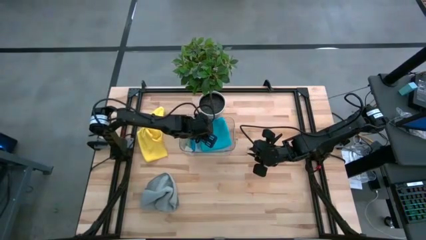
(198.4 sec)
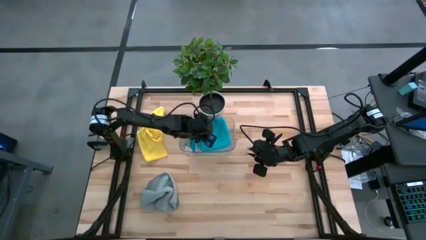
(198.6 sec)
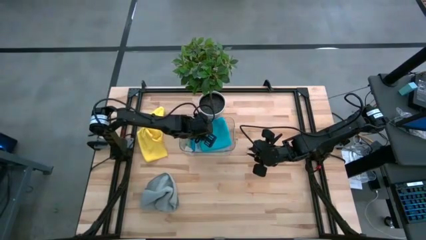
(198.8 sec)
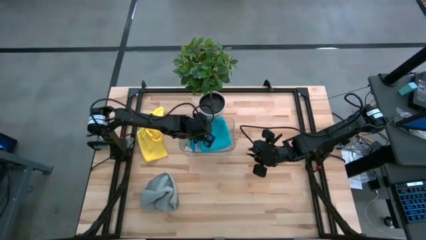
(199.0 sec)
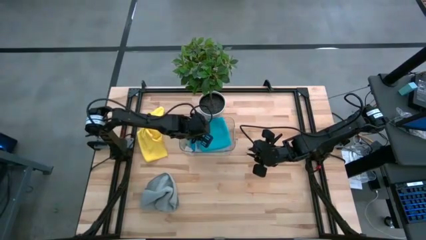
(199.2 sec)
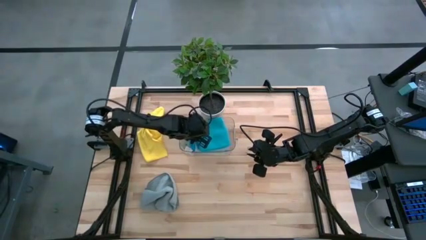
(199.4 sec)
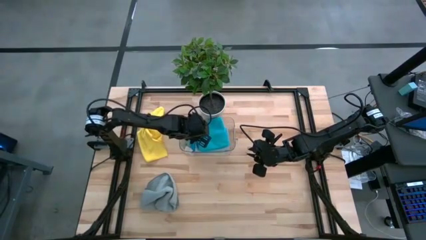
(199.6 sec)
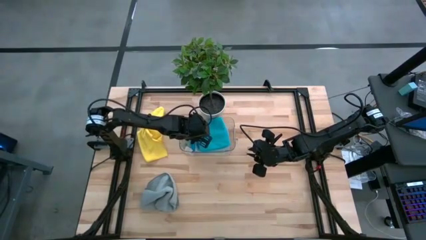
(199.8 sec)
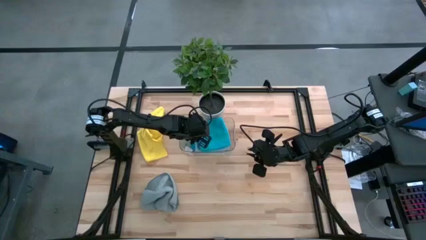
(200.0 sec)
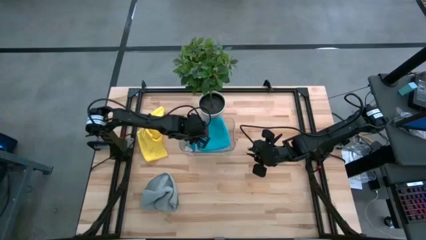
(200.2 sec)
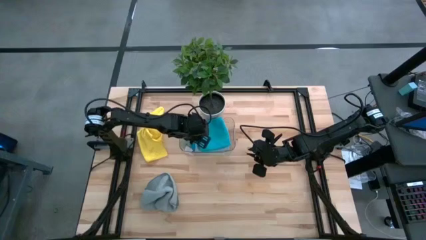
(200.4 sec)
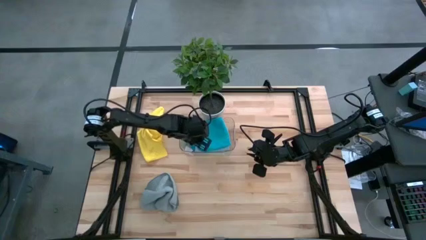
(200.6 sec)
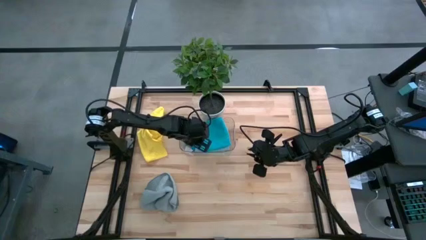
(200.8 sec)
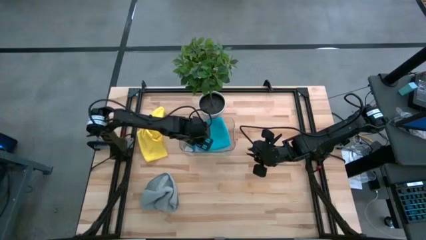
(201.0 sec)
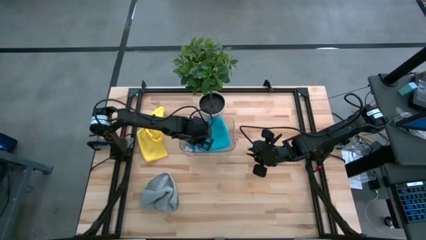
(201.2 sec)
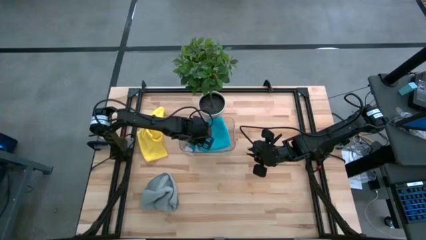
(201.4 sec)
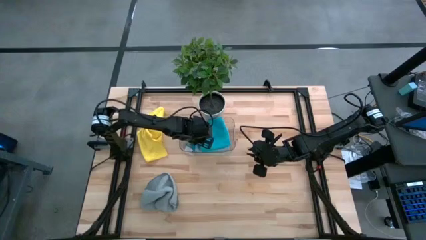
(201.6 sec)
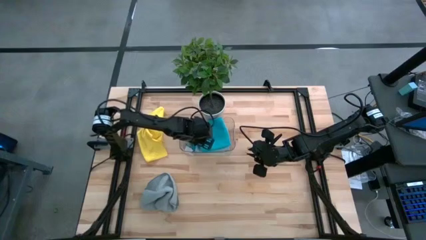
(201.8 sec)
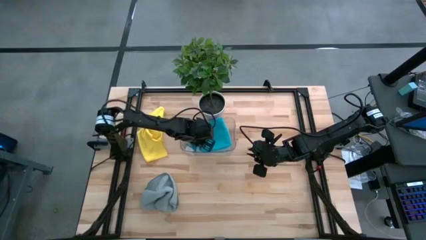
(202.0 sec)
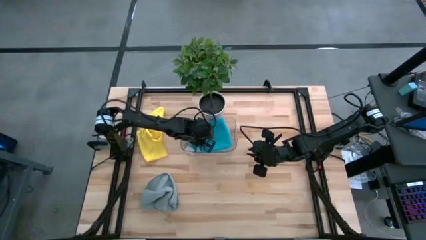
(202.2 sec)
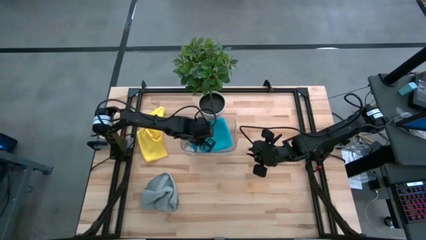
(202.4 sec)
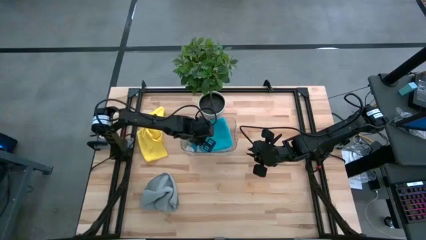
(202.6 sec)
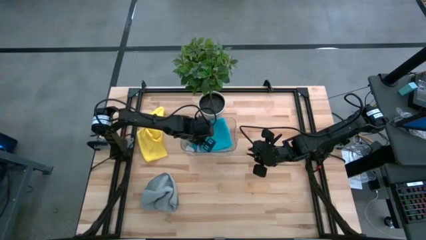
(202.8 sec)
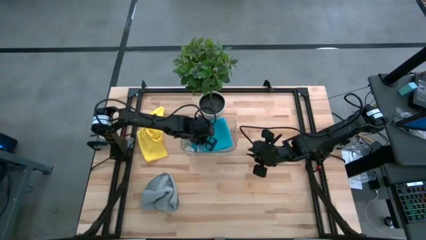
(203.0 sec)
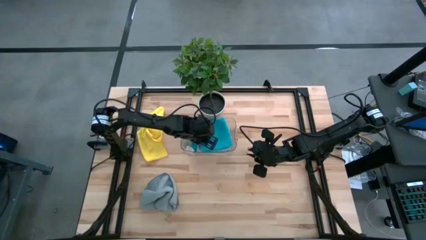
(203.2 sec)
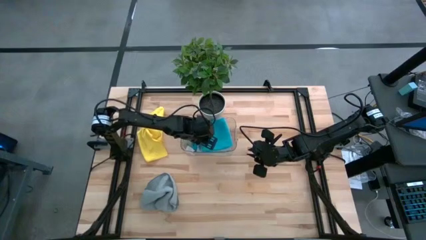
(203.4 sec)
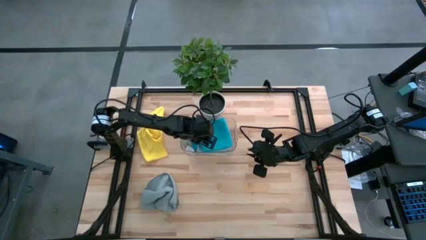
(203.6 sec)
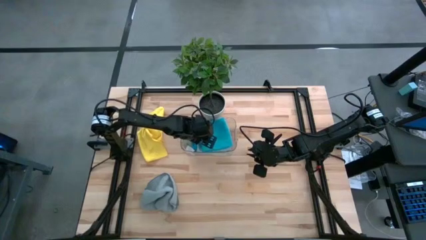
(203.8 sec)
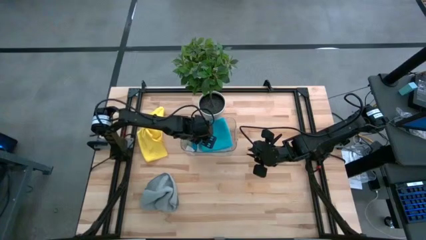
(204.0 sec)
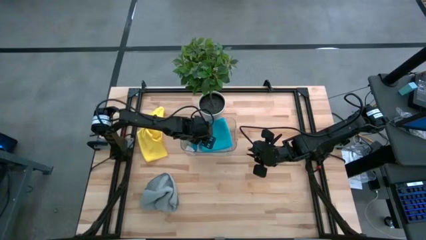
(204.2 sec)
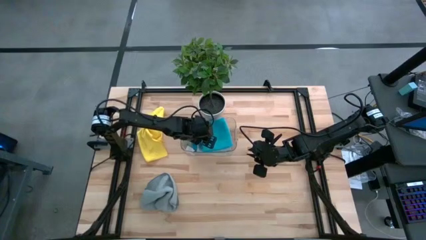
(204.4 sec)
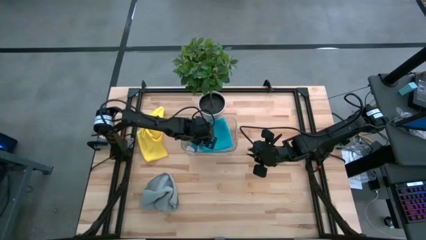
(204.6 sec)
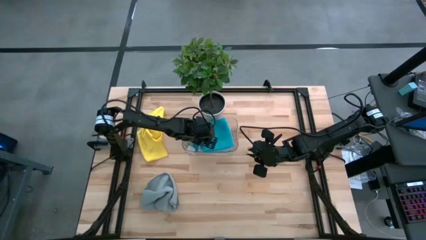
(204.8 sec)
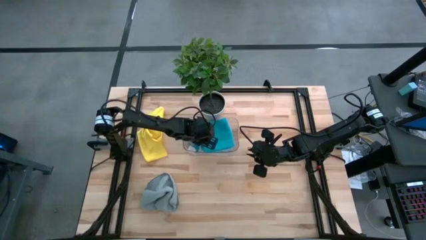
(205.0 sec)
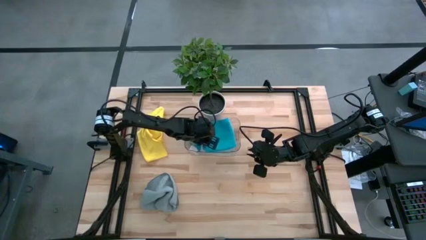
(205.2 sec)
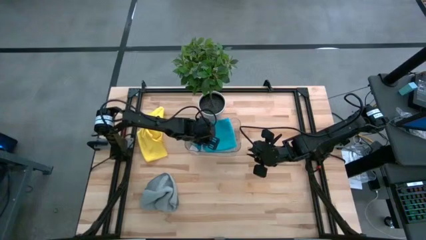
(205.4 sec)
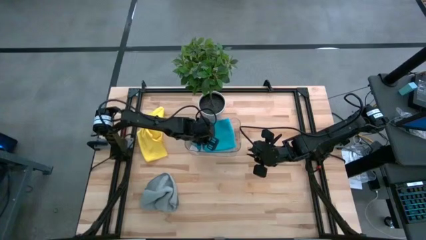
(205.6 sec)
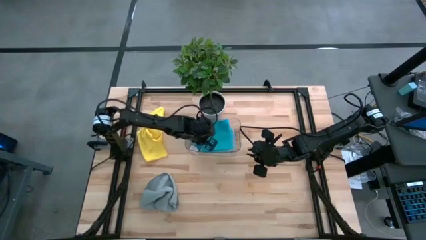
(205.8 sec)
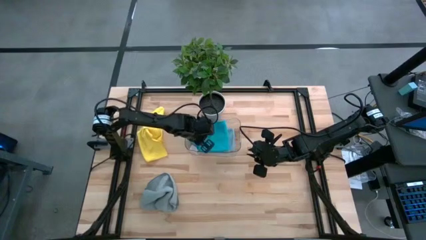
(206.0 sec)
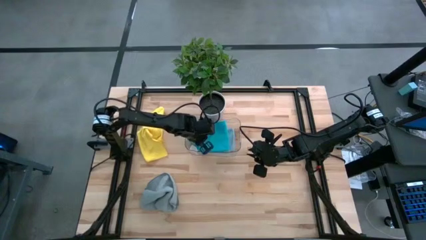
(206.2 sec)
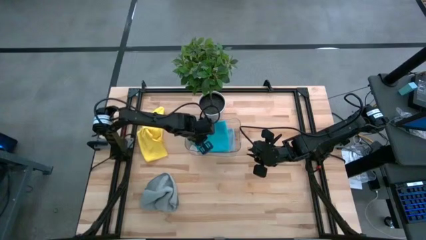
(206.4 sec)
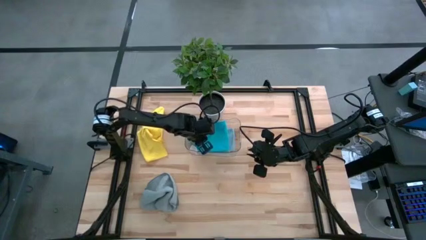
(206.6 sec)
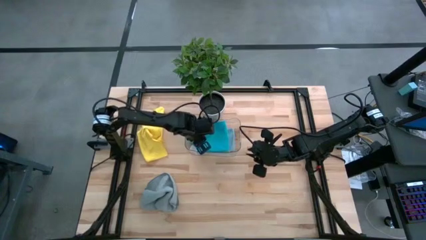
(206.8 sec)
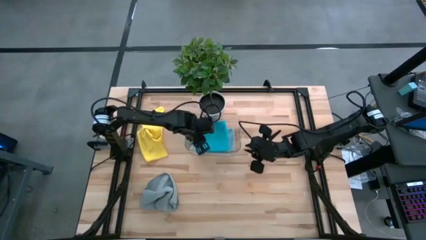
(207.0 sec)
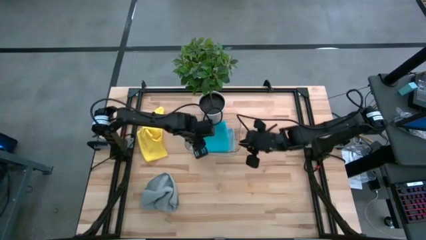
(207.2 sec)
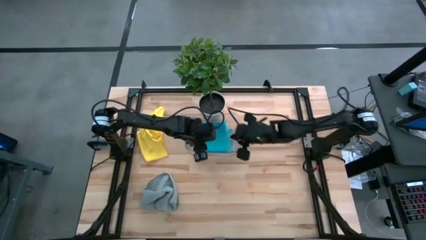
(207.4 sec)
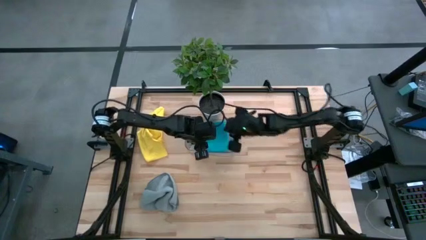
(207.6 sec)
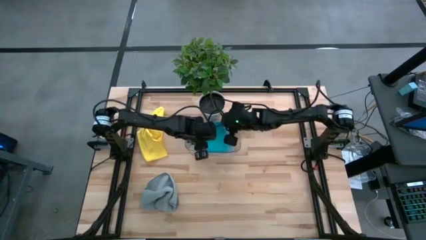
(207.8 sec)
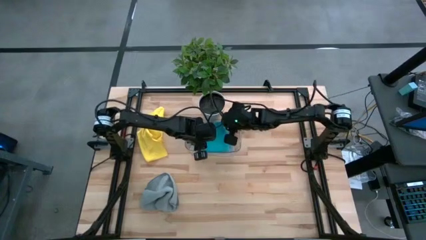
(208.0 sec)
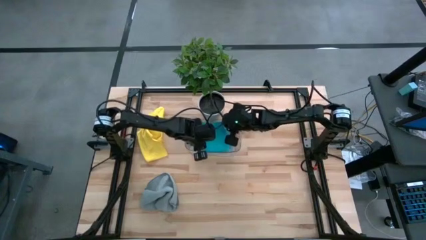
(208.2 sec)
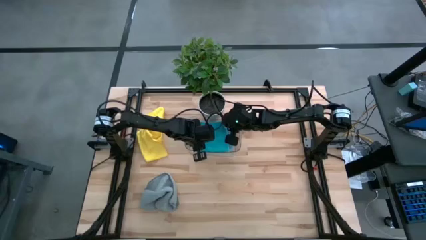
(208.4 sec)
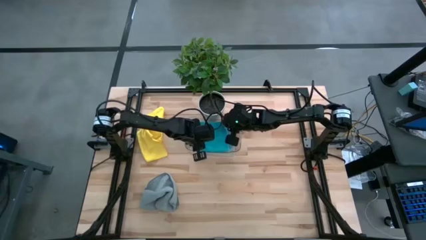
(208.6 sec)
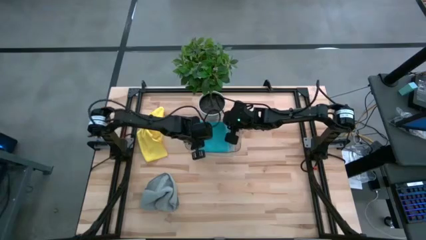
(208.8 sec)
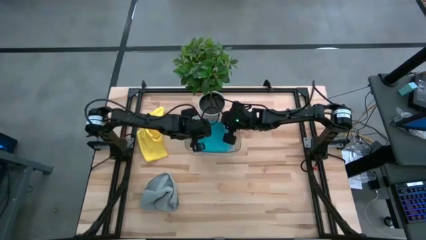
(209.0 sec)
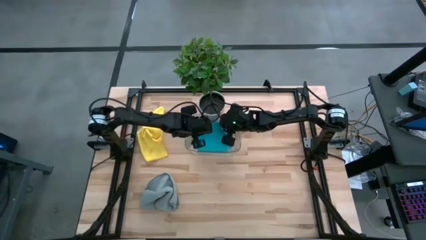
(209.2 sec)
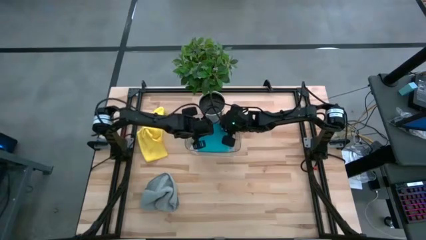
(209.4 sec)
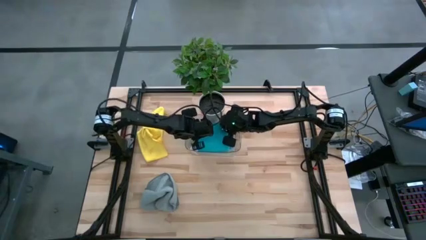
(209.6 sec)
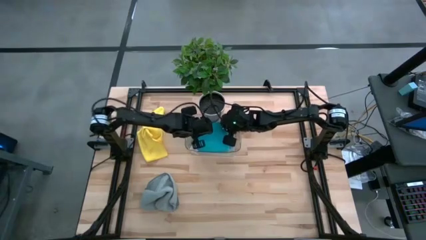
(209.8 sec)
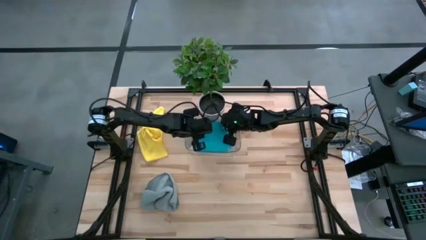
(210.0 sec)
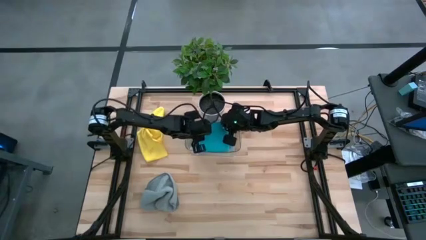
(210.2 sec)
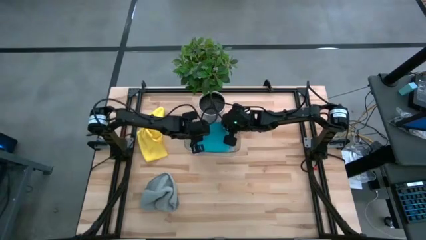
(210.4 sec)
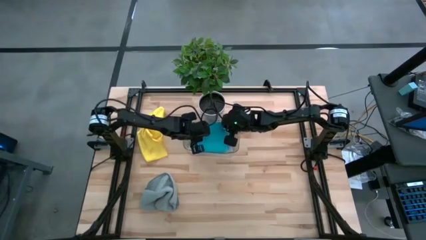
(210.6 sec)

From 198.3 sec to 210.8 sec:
Task: Fold microfiber towels
Stack the folded blue microfiber cloth on top of the folded light blue microfiber cloth
